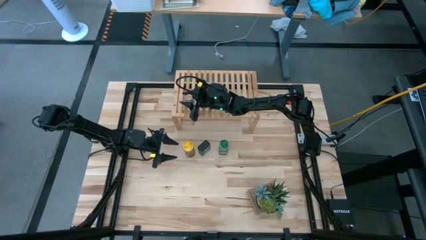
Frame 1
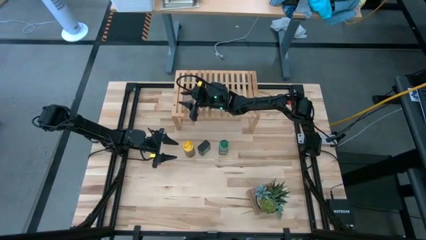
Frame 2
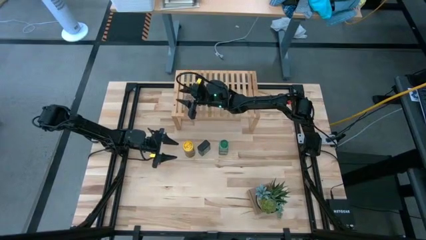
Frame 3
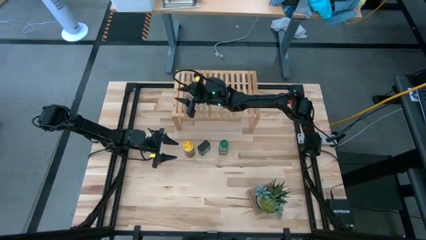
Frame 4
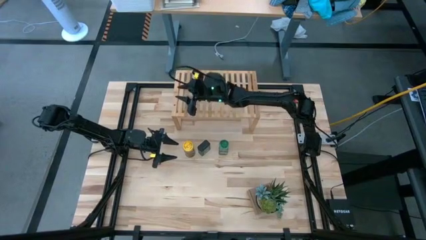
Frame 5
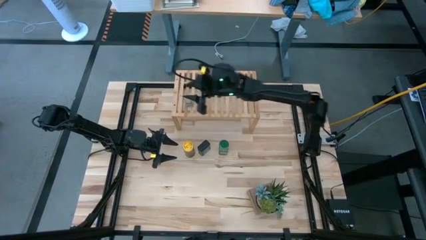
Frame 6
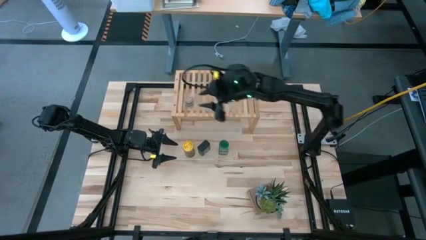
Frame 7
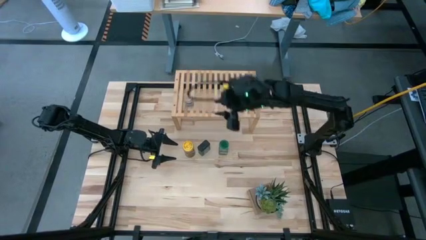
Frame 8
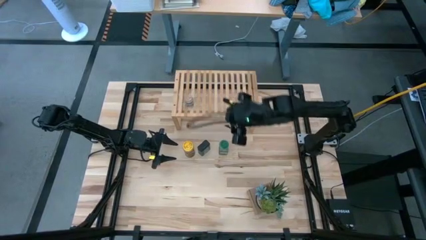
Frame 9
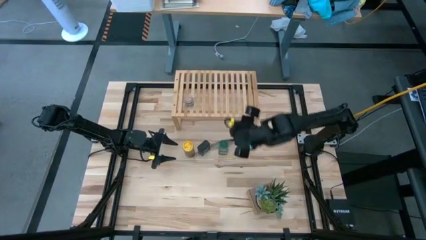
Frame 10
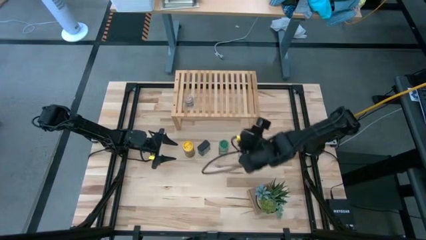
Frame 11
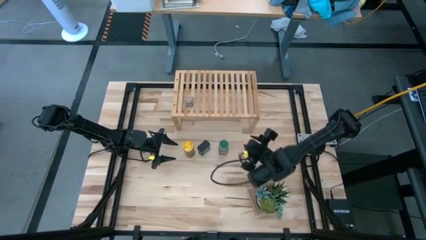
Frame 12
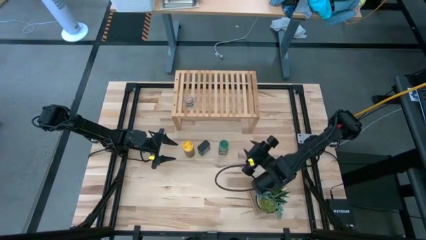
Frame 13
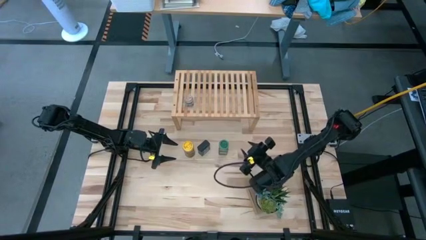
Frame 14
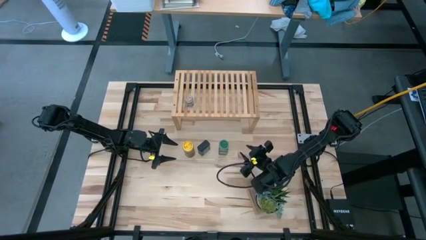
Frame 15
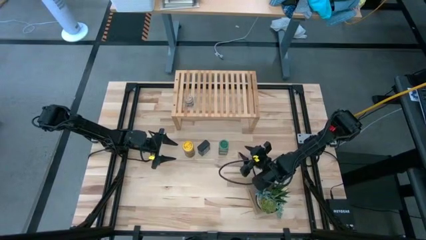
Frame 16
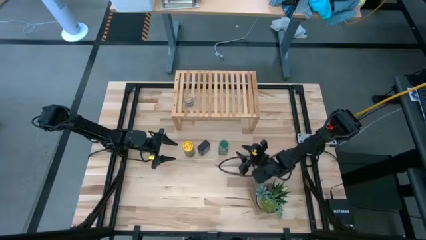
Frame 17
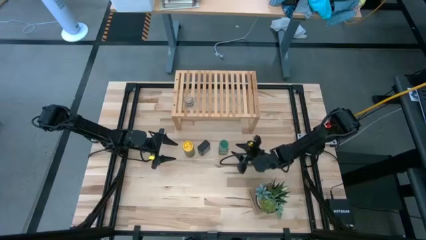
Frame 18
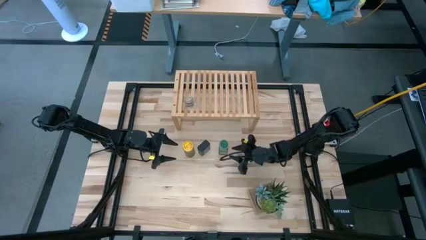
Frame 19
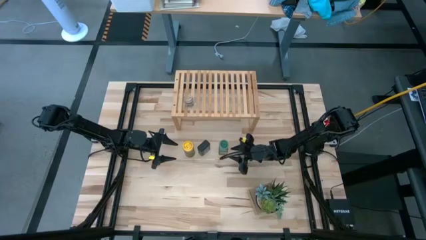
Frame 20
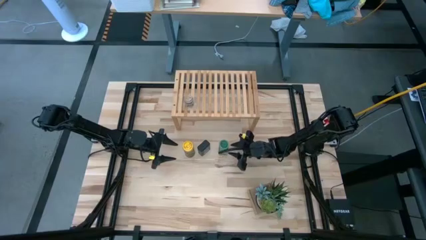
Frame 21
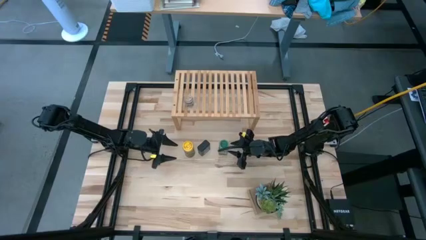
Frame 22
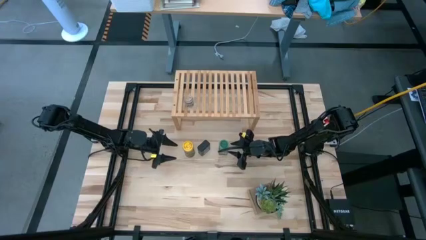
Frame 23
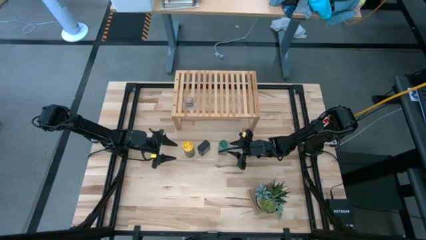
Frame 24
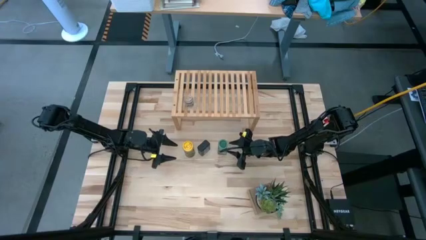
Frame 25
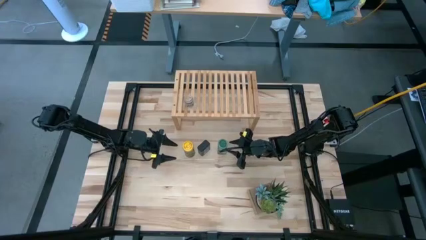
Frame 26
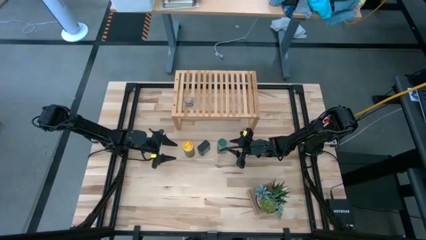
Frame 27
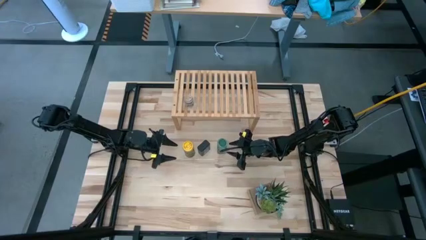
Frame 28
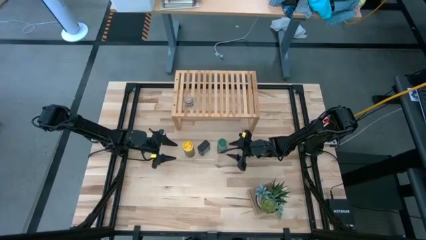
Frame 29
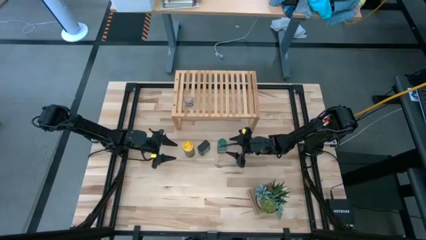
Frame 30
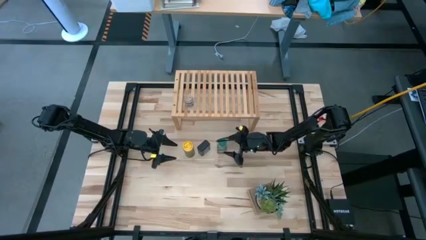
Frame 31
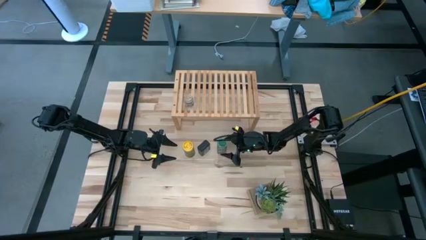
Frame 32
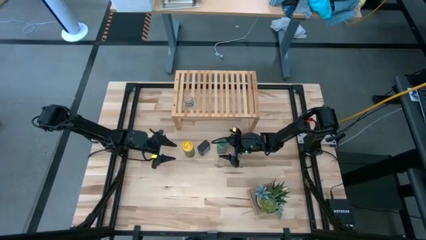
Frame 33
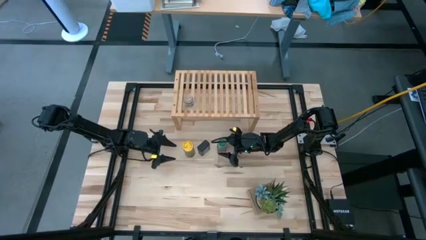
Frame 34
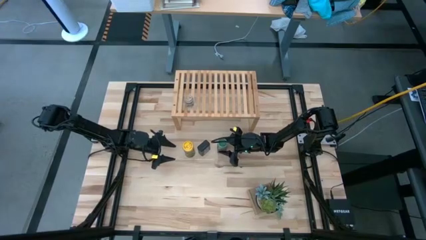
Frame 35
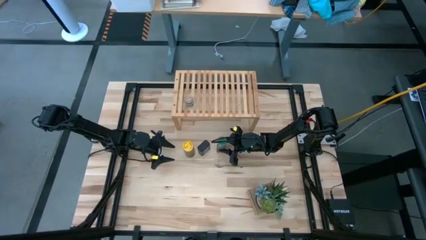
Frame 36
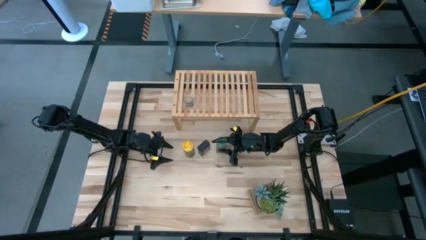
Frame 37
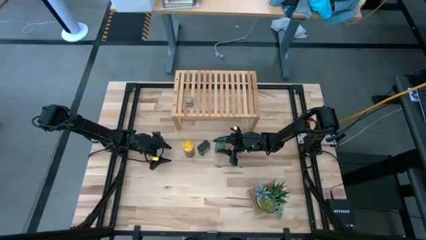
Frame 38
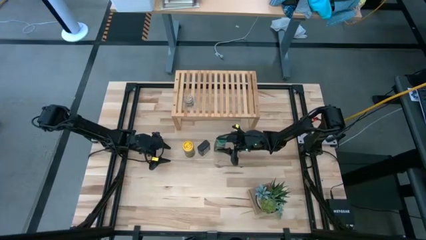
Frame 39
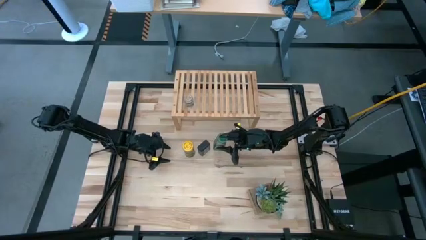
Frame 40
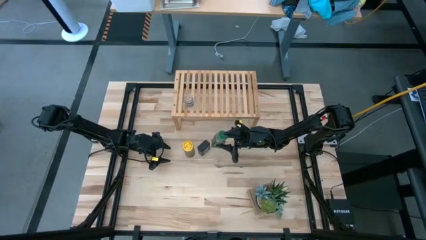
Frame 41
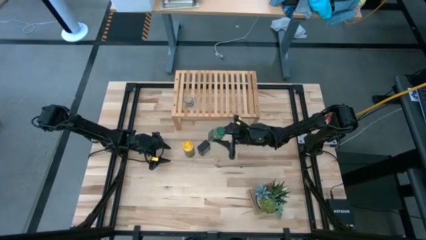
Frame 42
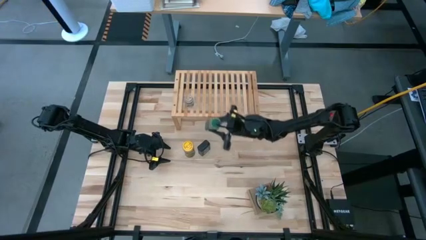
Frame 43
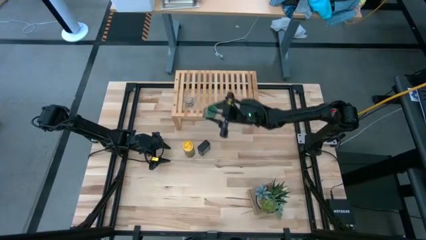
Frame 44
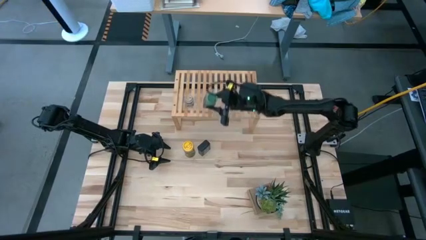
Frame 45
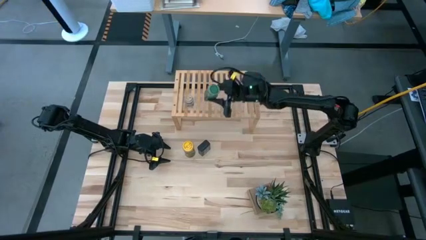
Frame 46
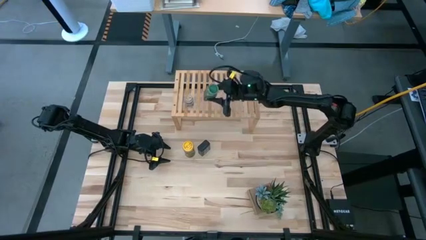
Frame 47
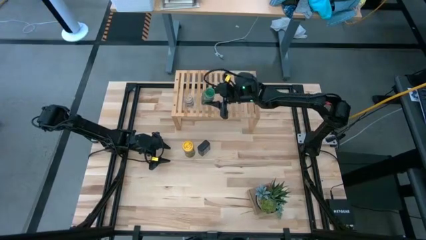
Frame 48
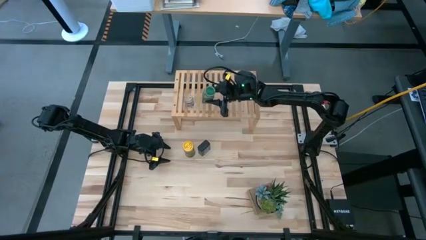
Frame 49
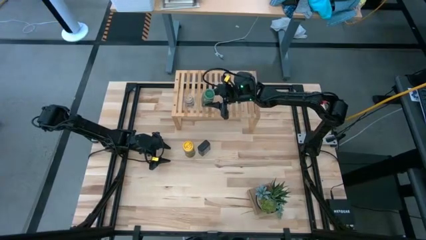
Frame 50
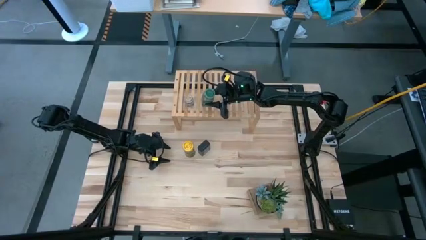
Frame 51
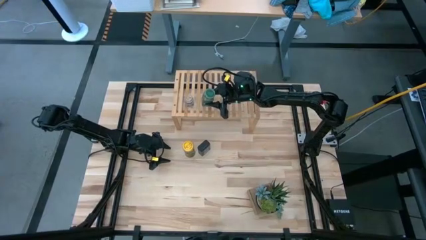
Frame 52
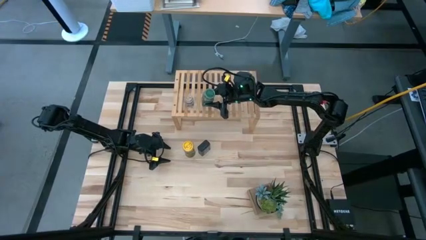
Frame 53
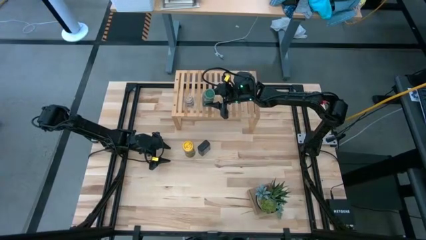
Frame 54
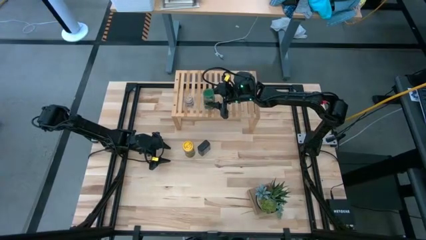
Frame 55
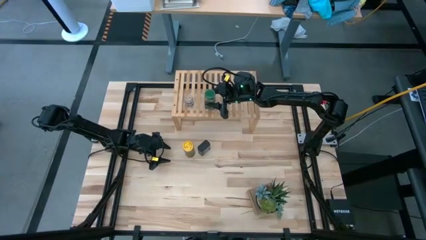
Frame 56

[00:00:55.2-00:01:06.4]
Task: Shelf spices
Put the green seasoning bottle on the shelf

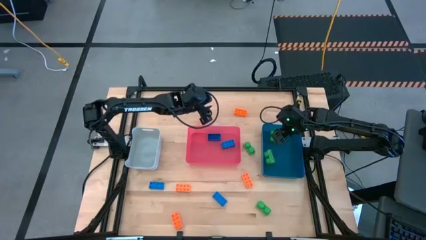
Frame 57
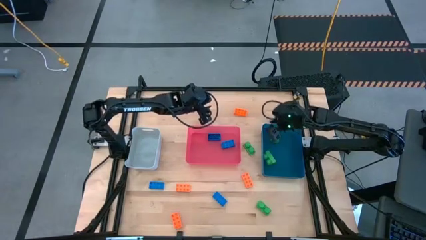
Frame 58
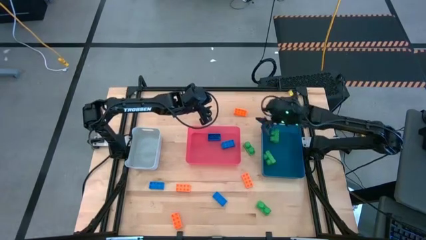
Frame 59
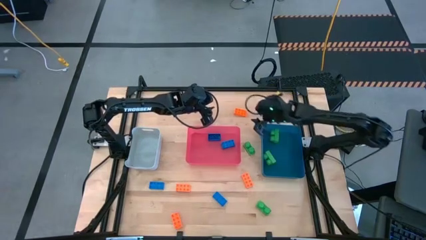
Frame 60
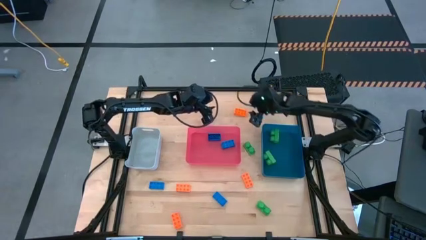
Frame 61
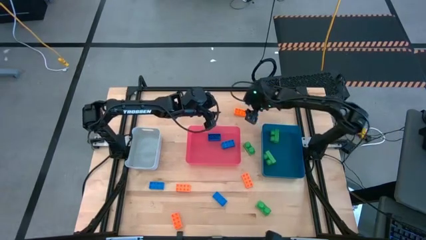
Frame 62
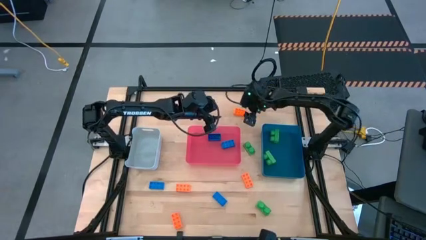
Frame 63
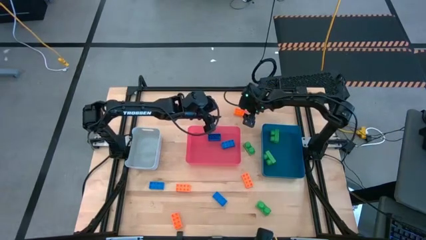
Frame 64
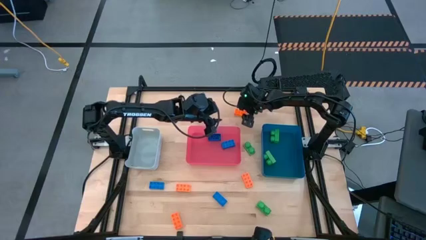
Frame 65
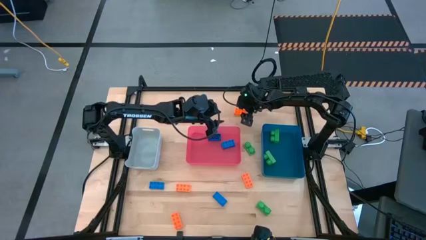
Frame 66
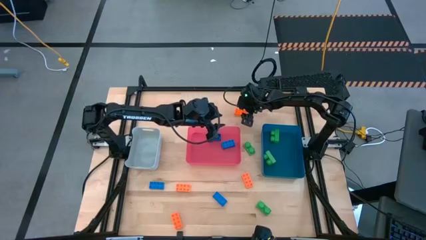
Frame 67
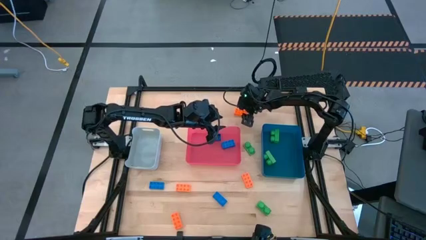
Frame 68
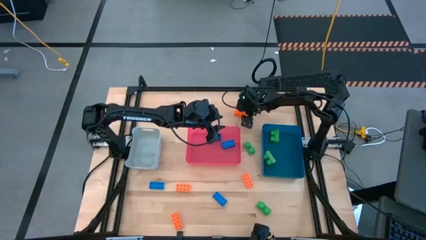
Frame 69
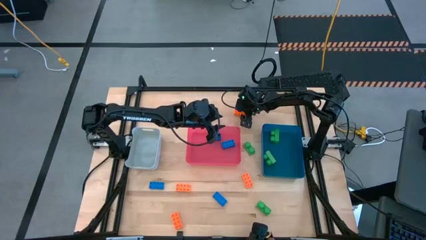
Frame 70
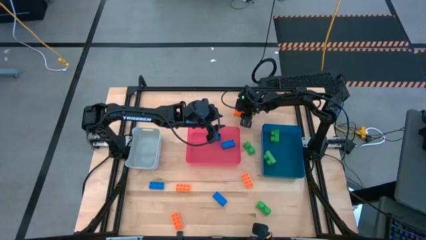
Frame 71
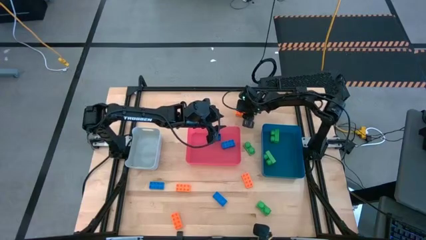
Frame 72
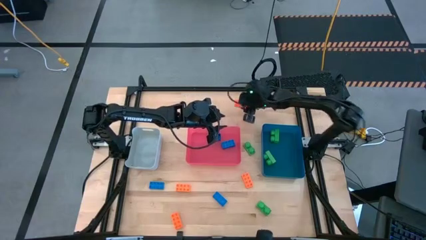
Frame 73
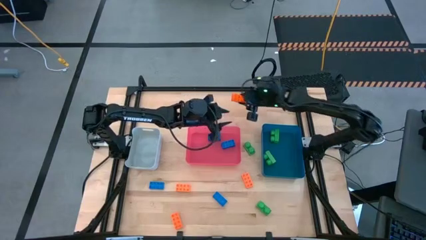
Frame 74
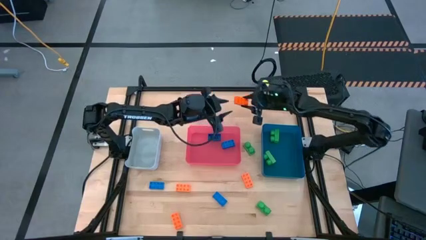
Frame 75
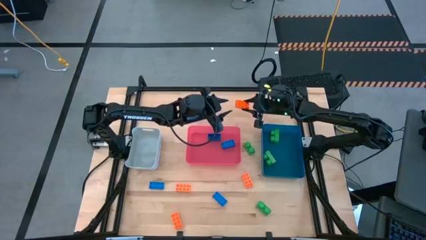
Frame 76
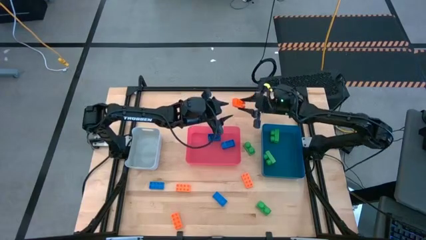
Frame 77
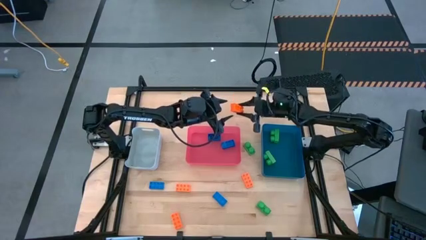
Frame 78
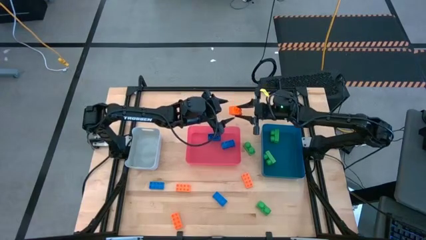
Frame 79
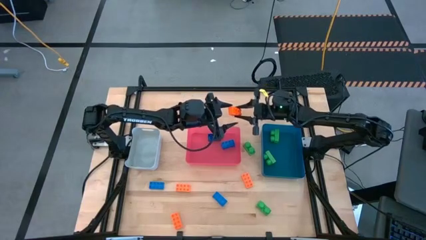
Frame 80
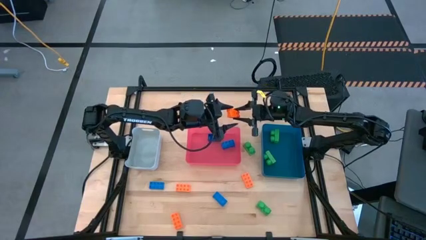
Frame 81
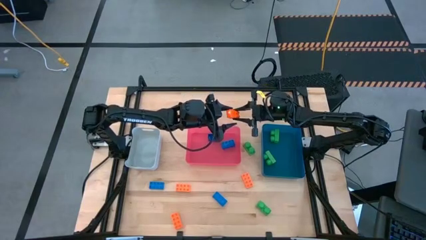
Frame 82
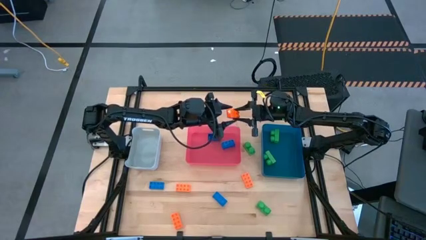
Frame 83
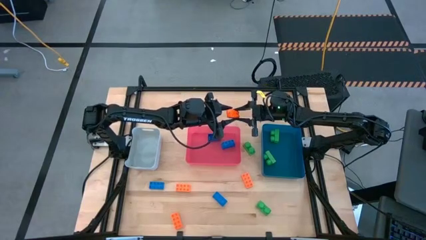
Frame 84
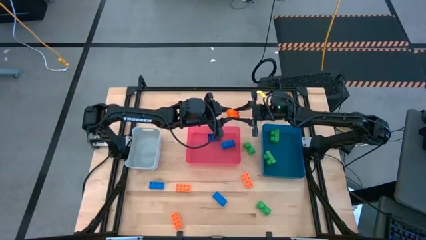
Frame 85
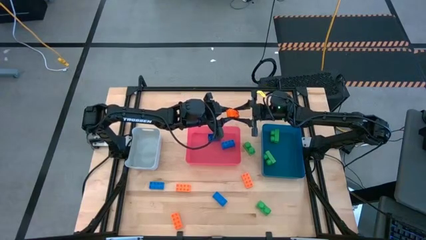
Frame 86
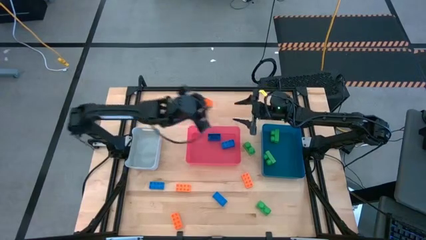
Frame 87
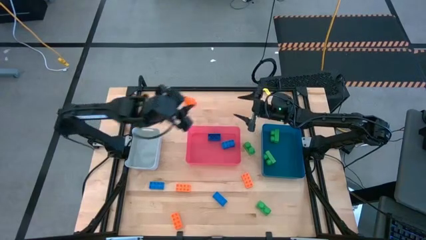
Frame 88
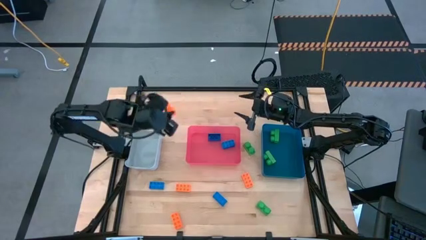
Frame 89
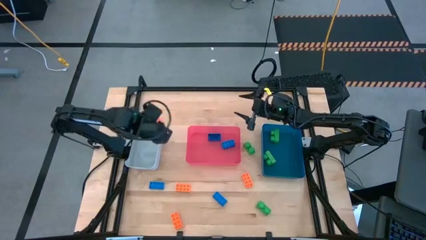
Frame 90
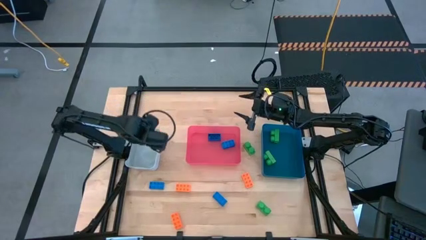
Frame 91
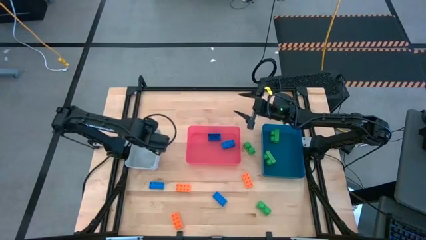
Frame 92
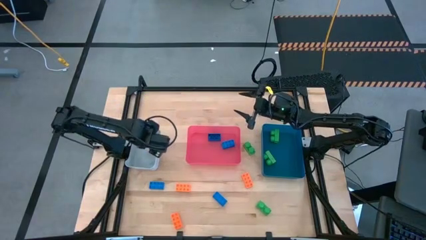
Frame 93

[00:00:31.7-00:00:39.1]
Task: Sort & place blocks by color
Put the orange game piece into the gray bin
